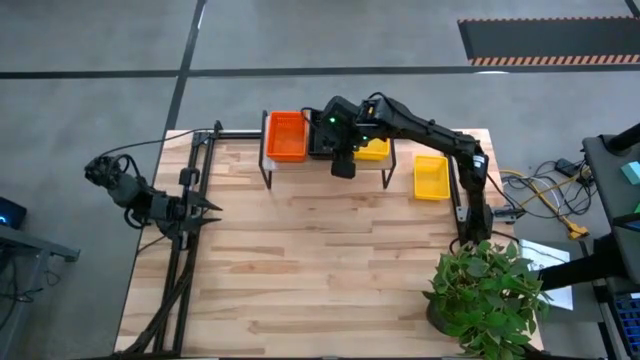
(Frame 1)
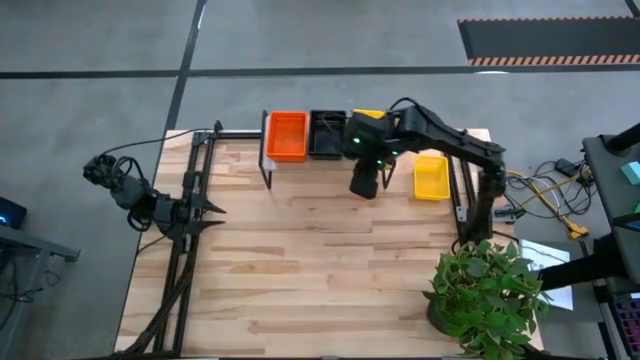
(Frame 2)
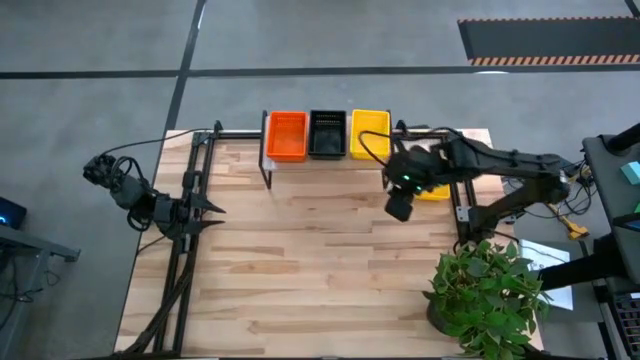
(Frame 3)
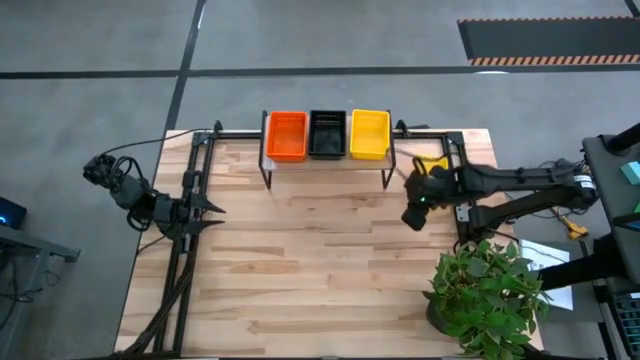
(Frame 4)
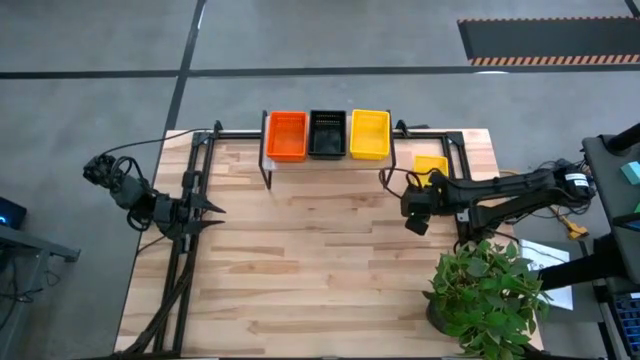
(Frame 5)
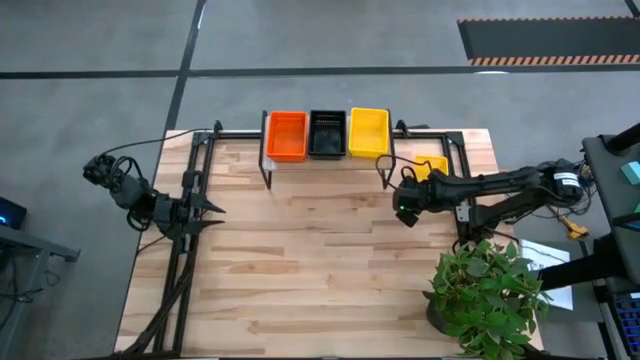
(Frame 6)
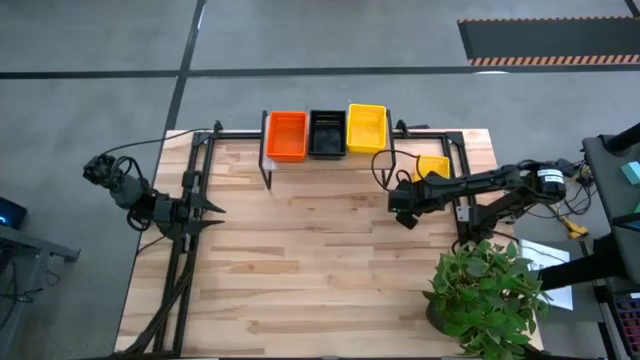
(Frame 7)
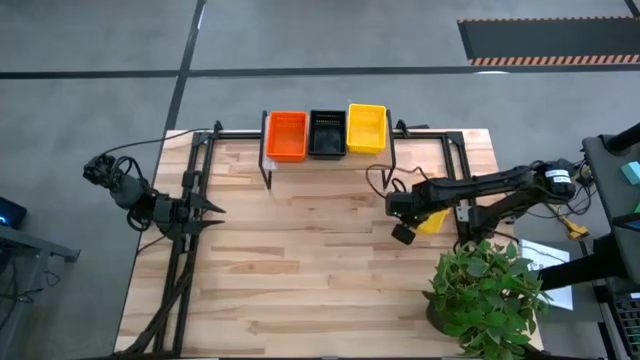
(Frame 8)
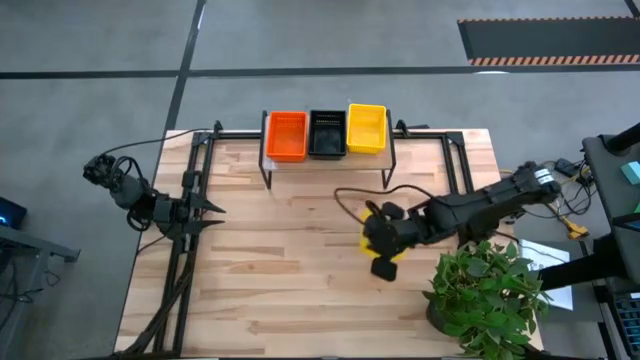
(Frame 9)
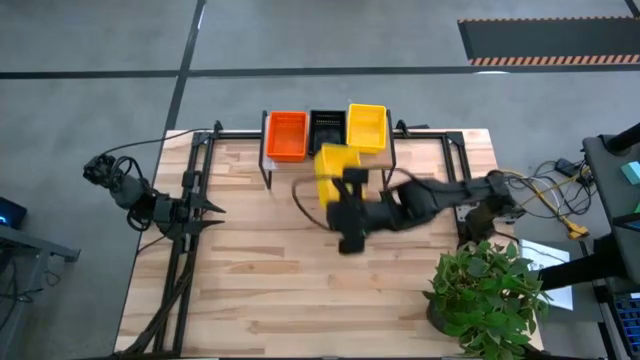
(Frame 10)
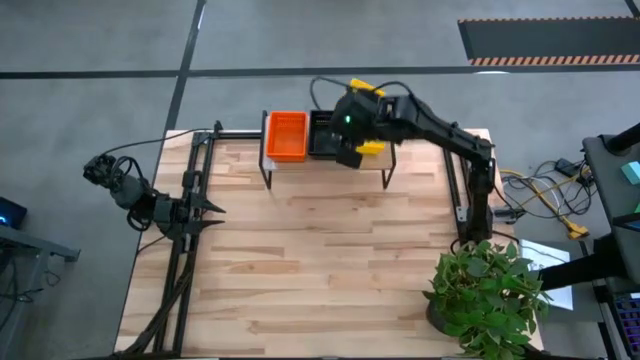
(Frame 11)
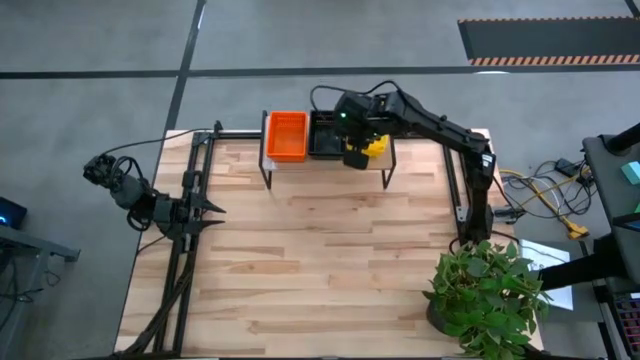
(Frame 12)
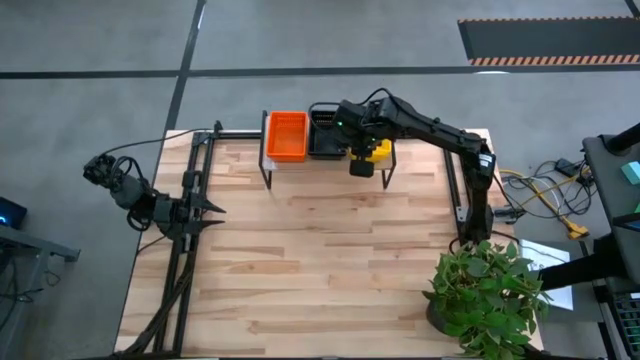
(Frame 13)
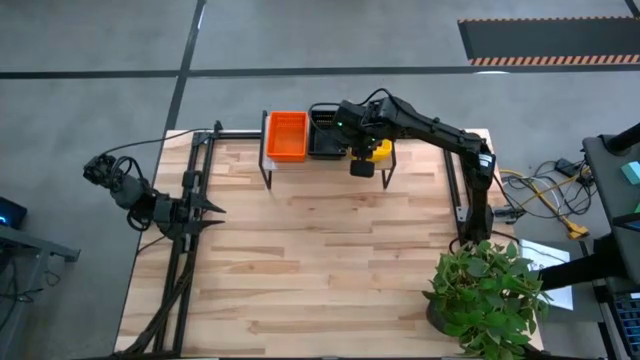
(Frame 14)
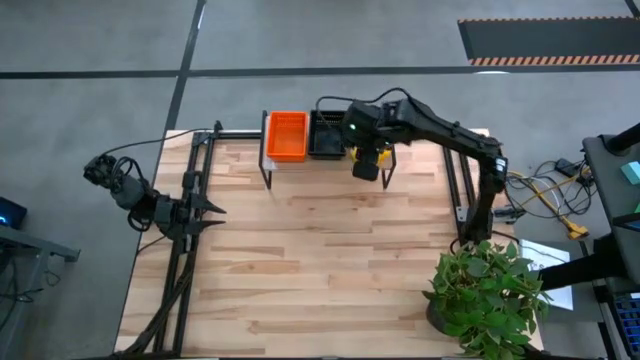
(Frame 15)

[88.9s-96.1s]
Stack the yellow basket into the stacked yellow basket

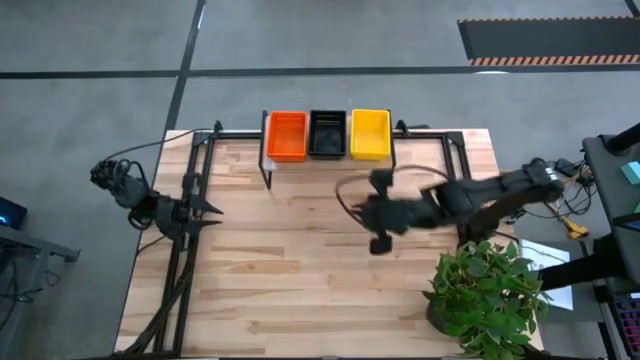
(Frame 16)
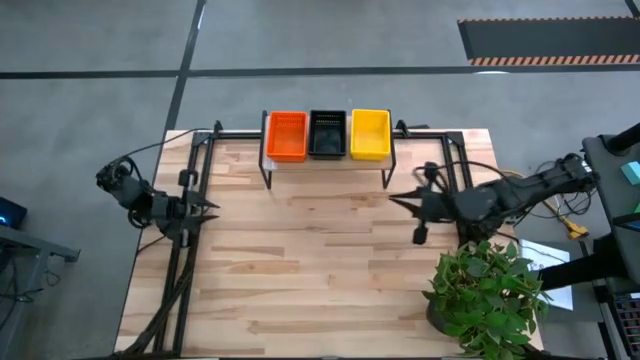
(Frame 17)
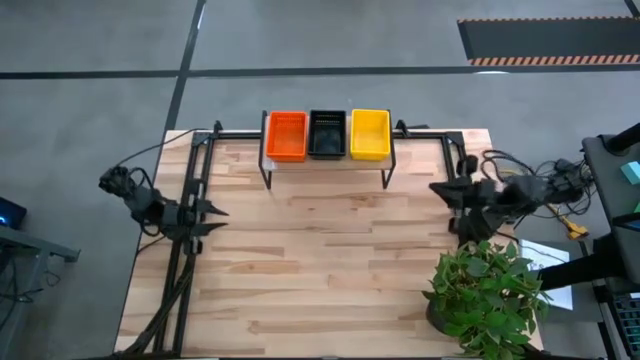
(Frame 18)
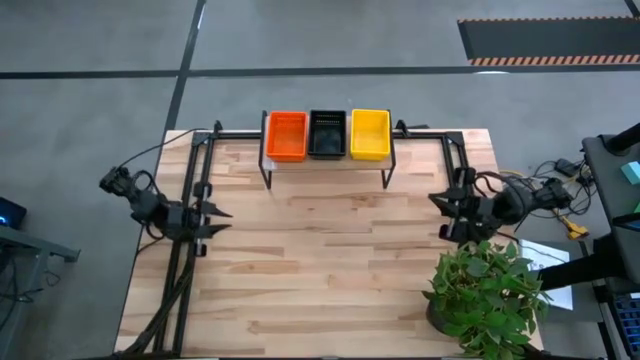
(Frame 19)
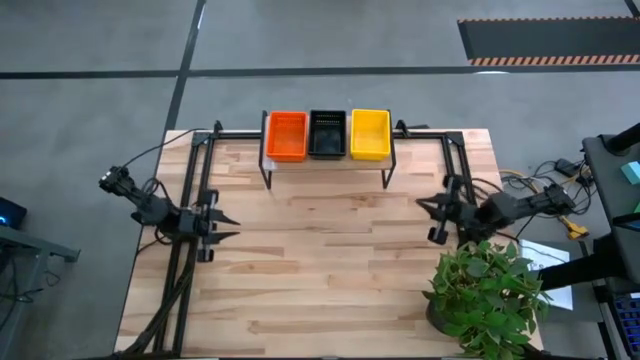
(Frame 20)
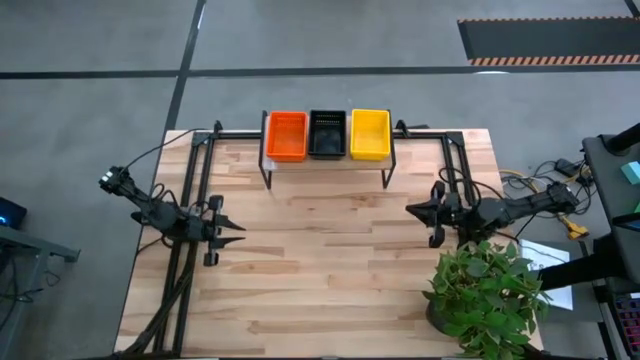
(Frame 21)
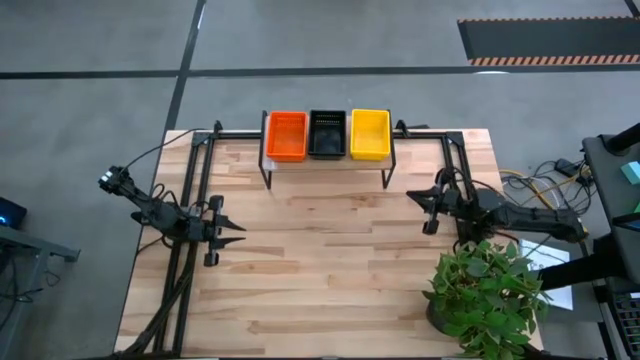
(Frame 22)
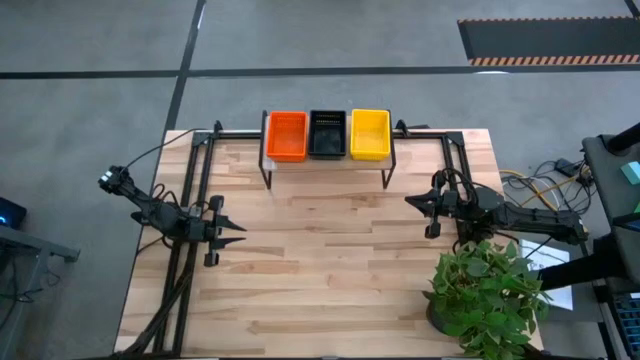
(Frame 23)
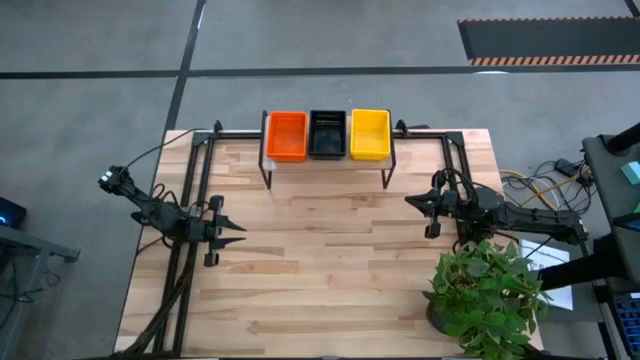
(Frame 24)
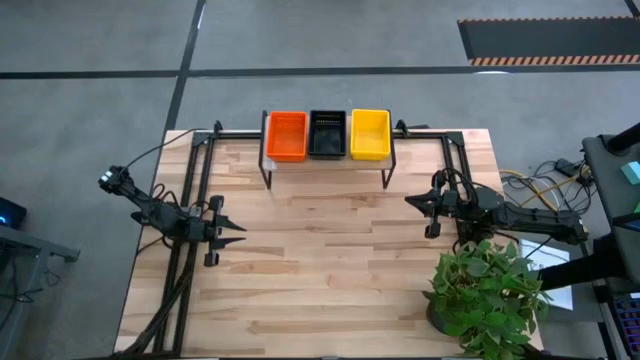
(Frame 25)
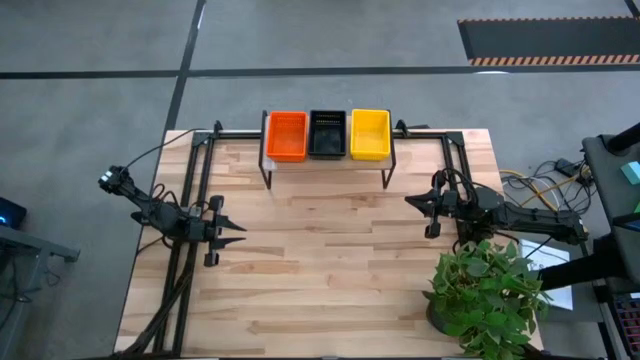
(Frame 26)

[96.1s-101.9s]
Return to Home Position

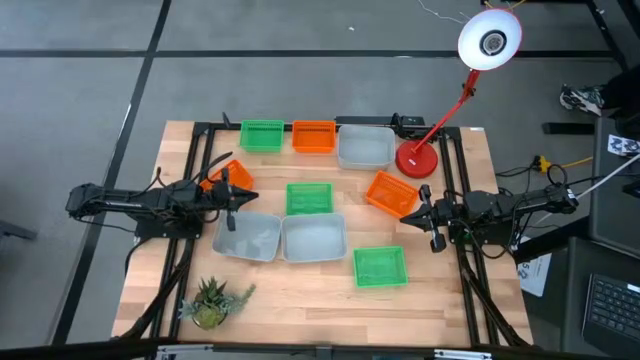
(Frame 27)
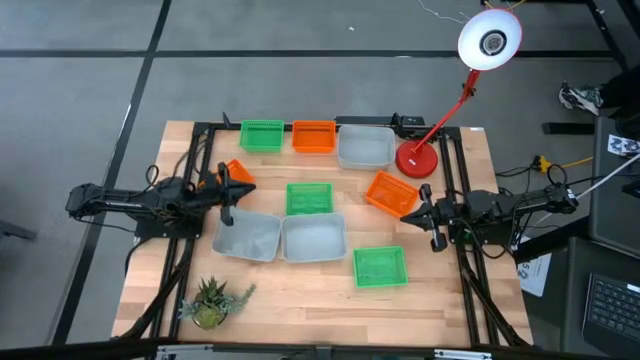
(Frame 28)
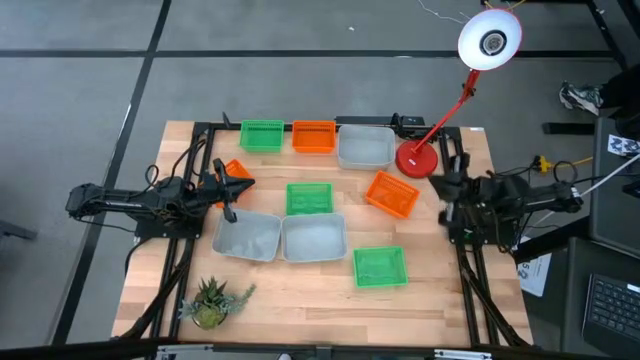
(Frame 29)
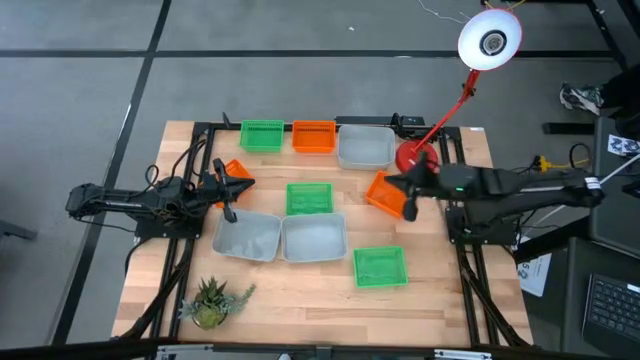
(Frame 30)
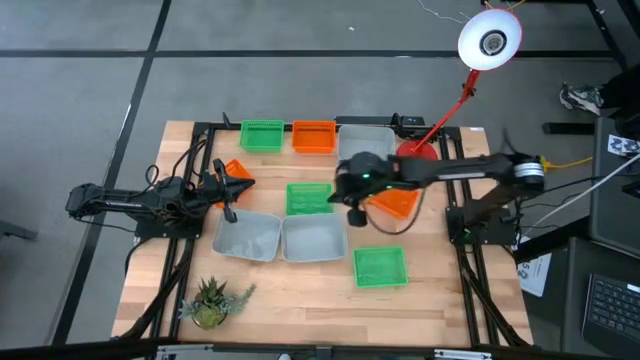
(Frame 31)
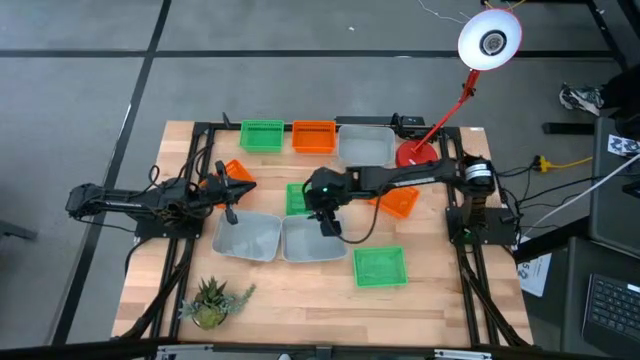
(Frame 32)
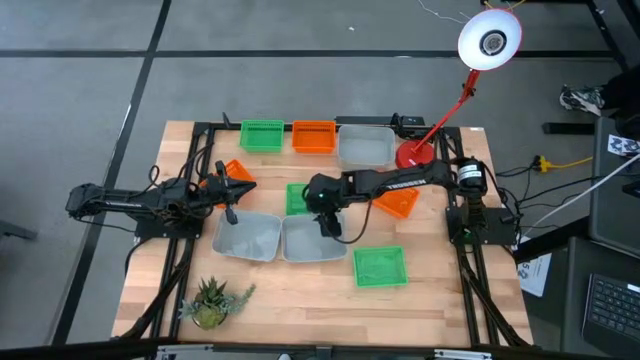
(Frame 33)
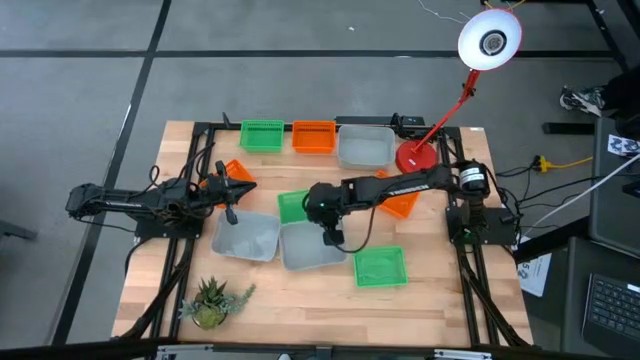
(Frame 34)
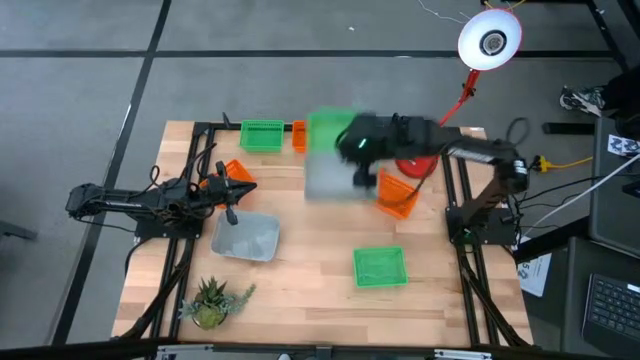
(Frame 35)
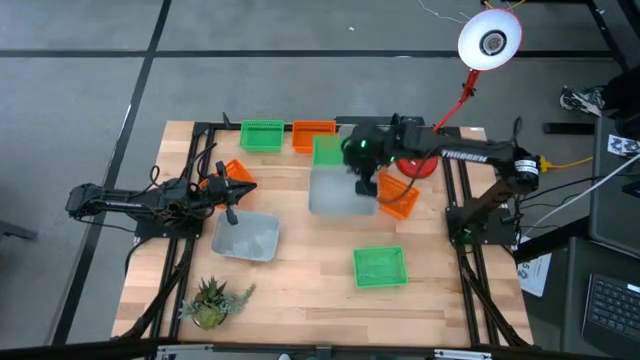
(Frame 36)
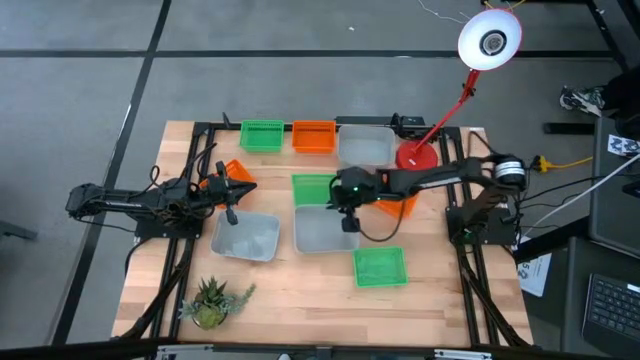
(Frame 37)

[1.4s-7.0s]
Stack the bottom right gray bin on top of the top gray bin
